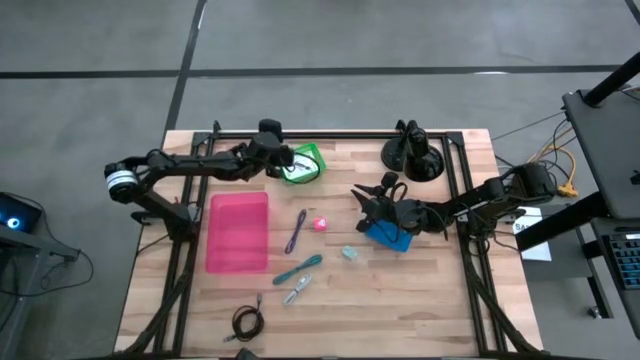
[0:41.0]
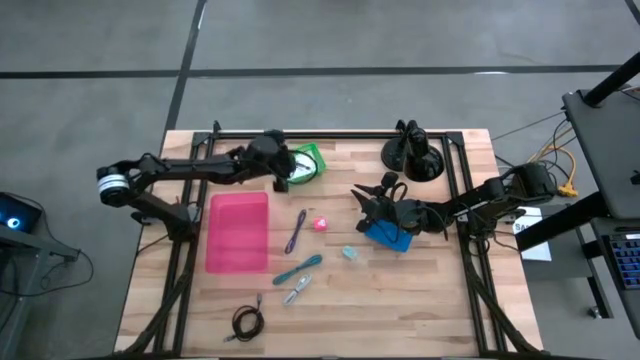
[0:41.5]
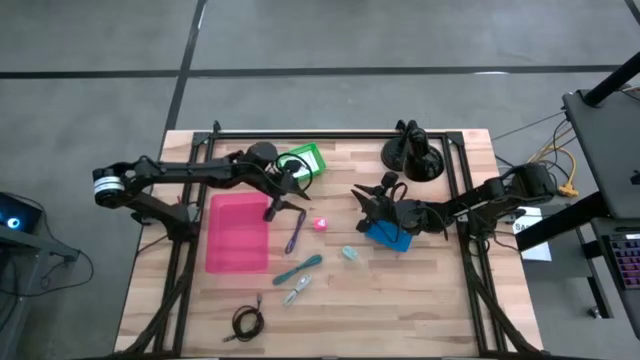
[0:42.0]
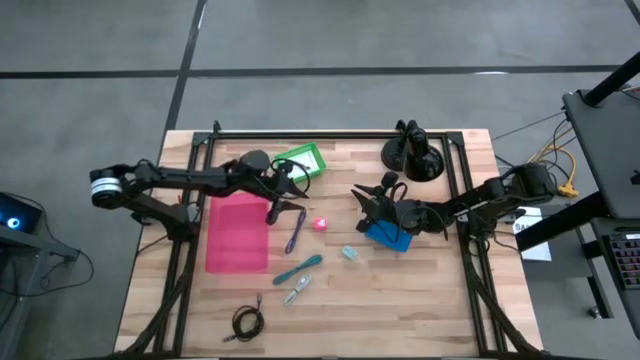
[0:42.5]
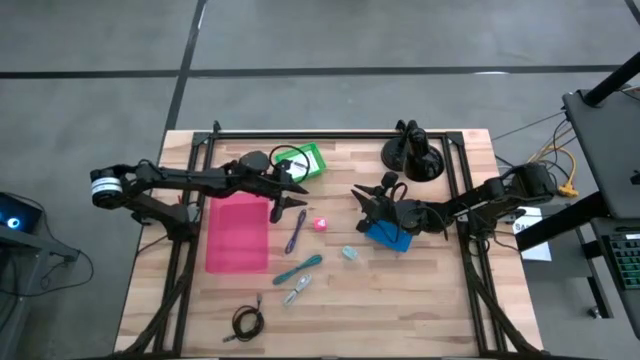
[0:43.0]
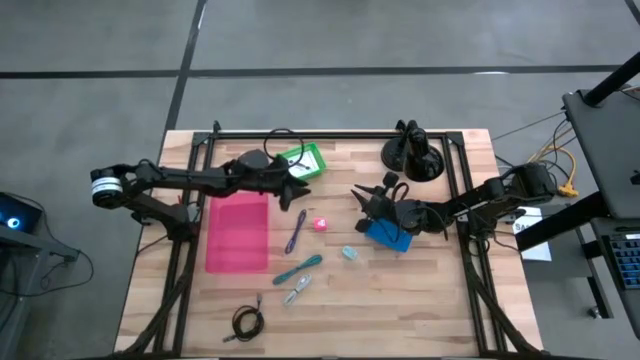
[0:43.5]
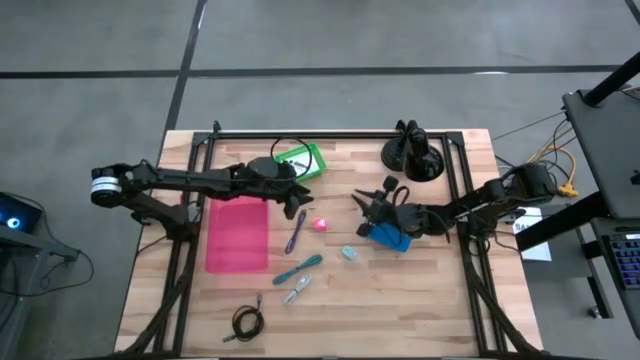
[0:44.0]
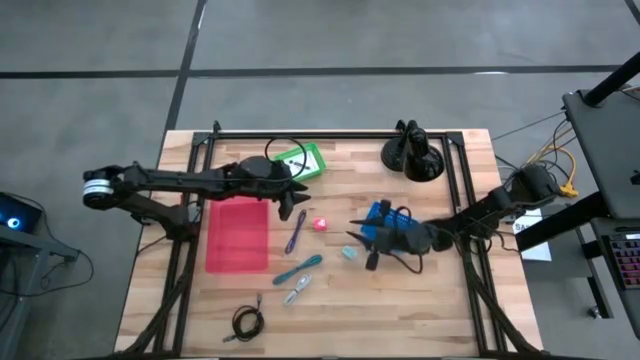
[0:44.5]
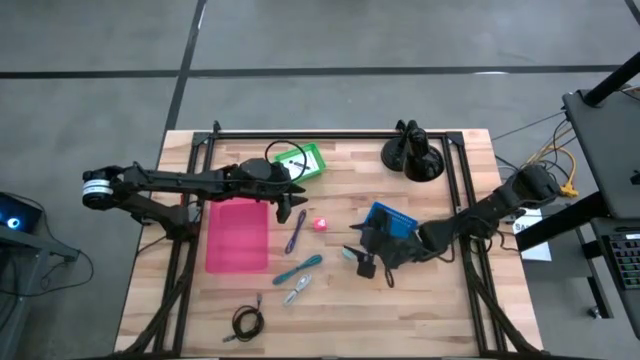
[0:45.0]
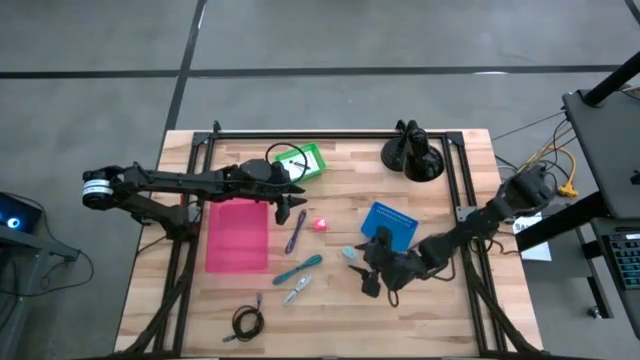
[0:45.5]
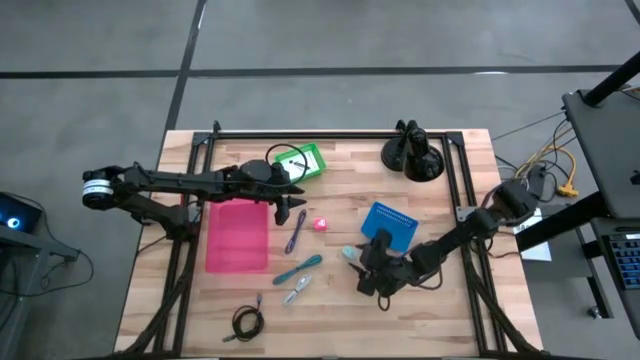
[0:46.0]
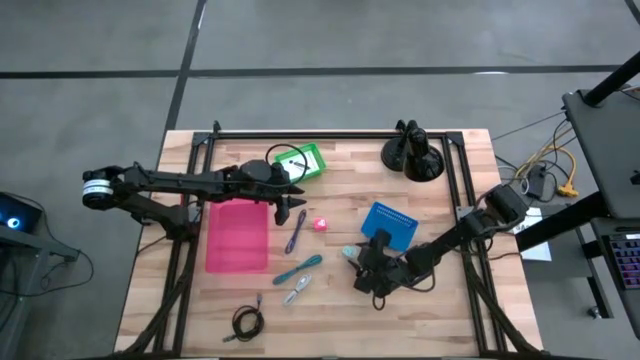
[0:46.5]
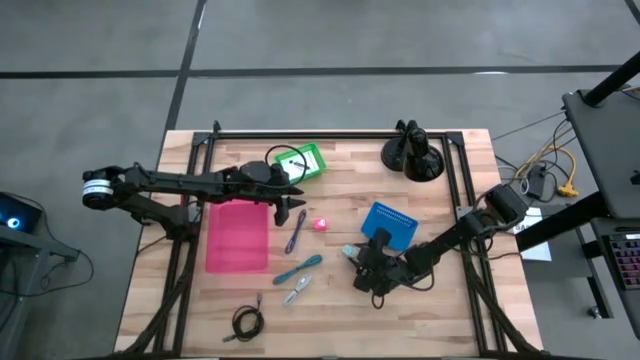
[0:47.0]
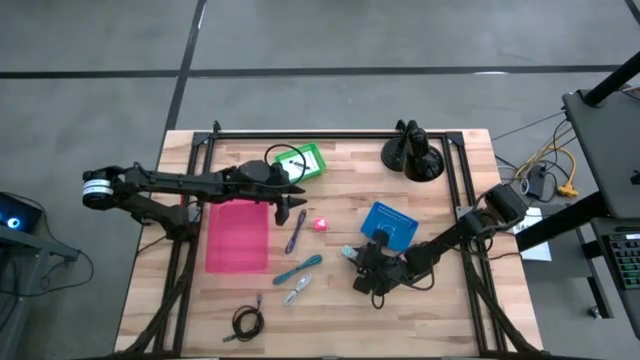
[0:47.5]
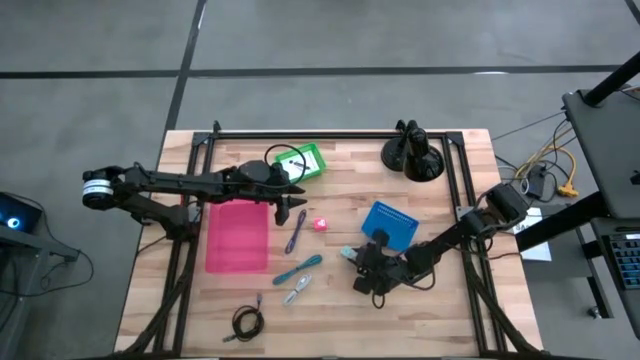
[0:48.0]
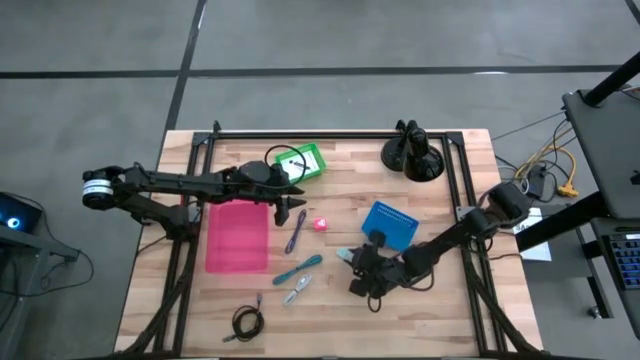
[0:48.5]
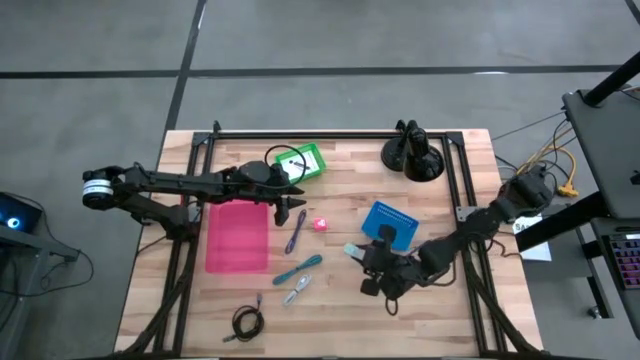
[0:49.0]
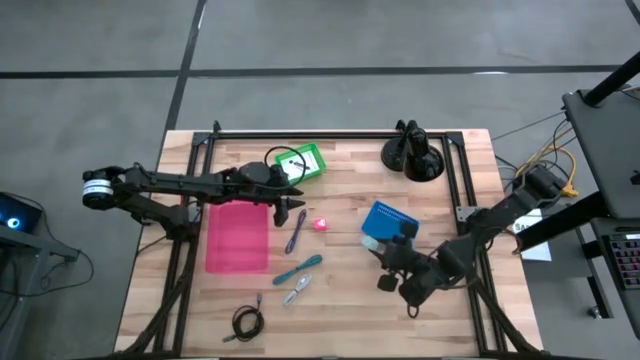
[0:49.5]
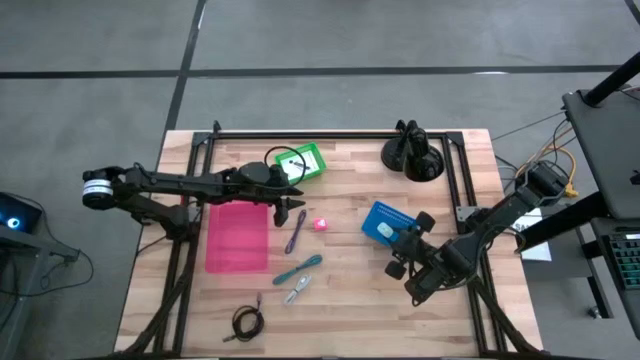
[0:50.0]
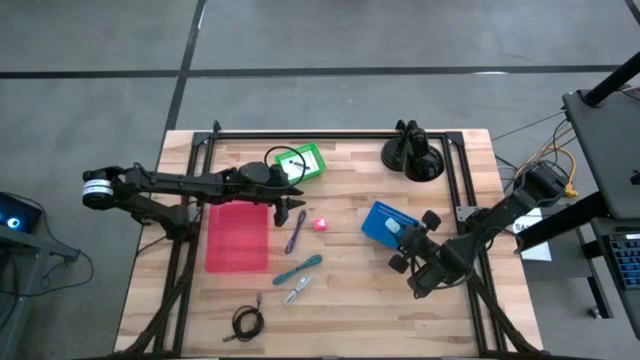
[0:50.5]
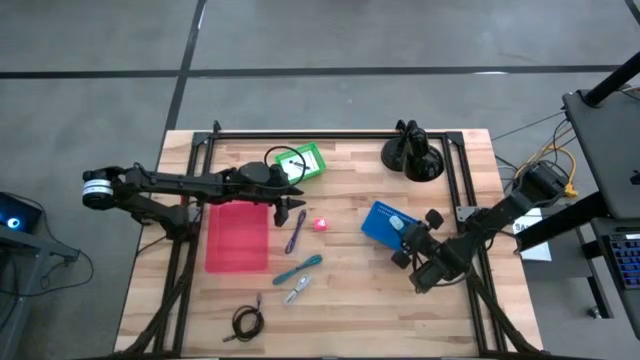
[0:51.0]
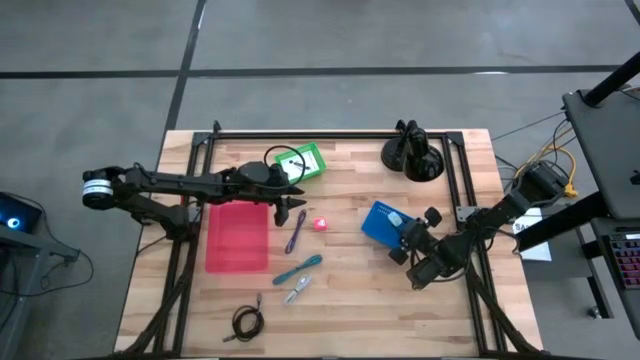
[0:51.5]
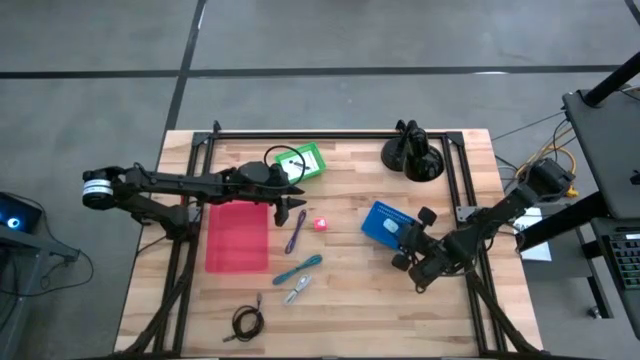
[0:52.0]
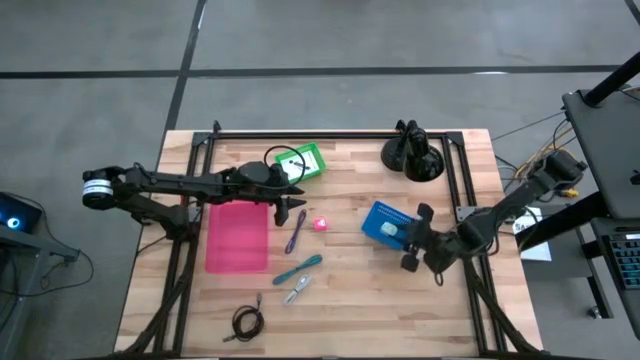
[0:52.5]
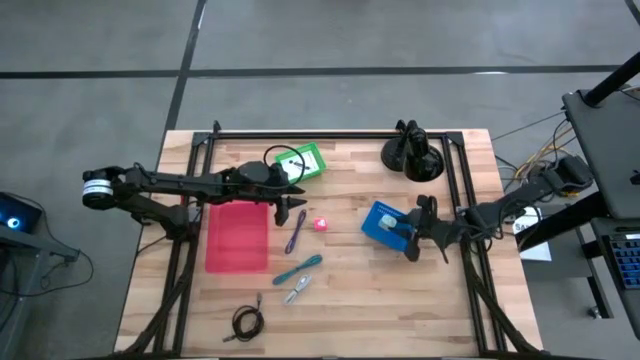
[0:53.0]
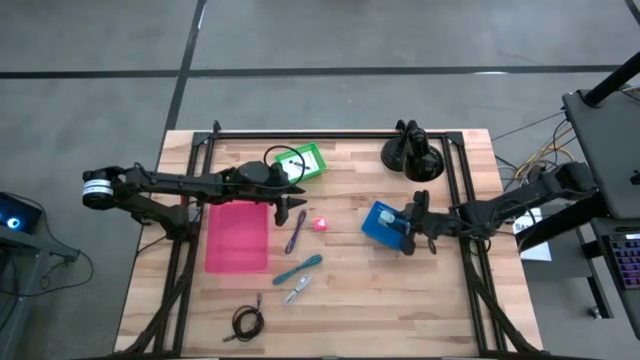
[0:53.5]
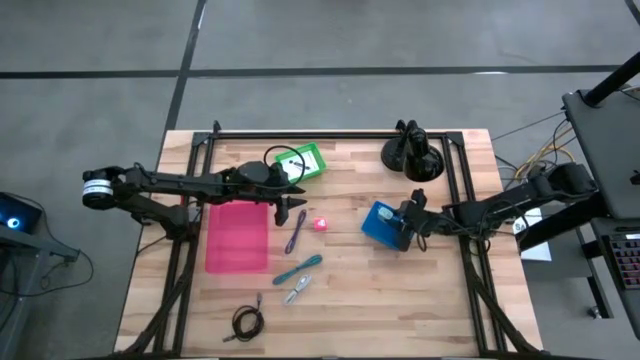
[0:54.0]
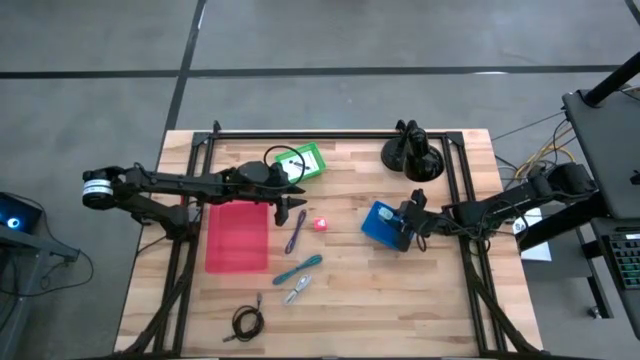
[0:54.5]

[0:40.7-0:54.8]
Task: Pick and place items into bin
Put the blue charger adapter into the blue bin

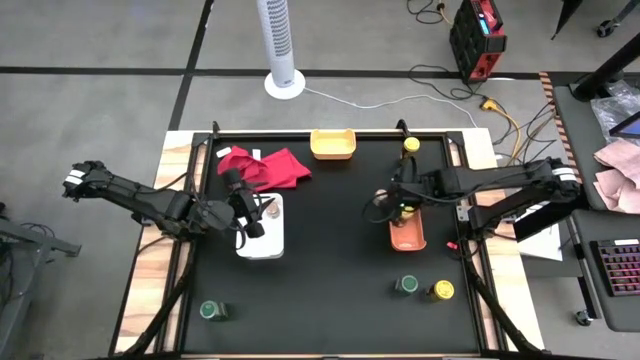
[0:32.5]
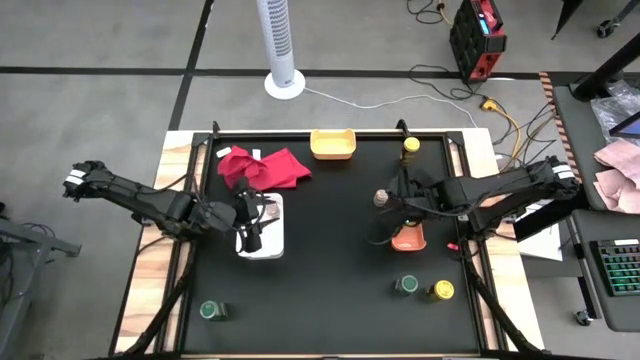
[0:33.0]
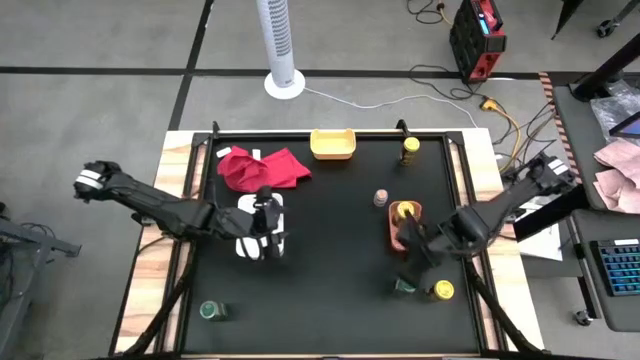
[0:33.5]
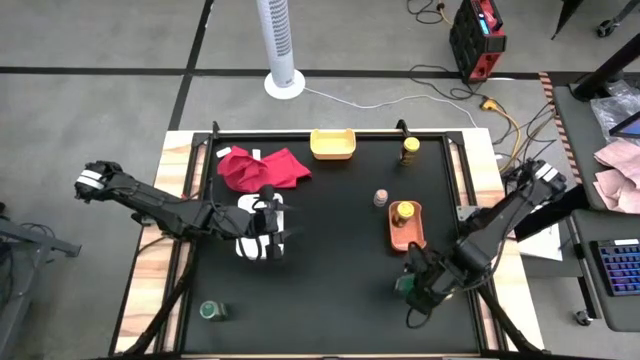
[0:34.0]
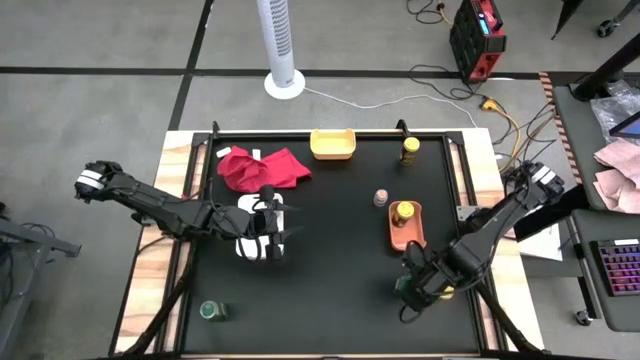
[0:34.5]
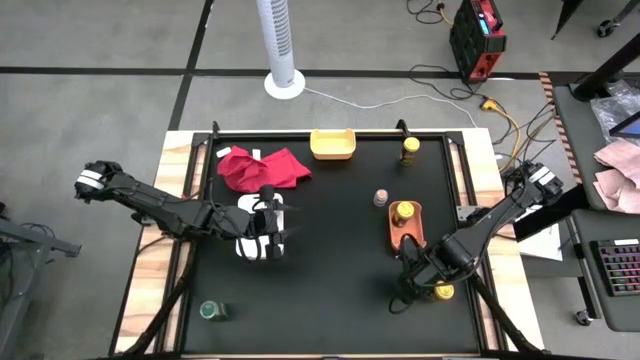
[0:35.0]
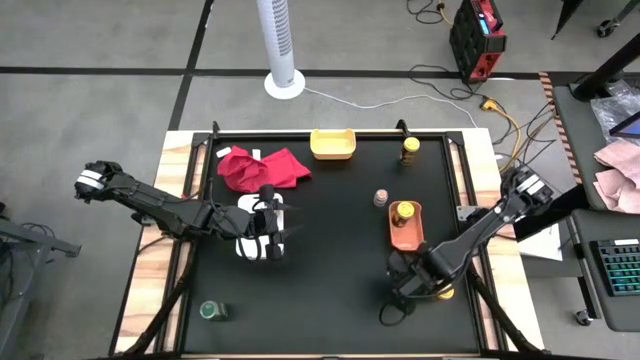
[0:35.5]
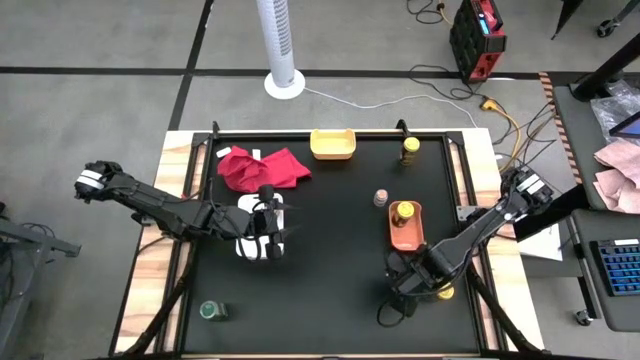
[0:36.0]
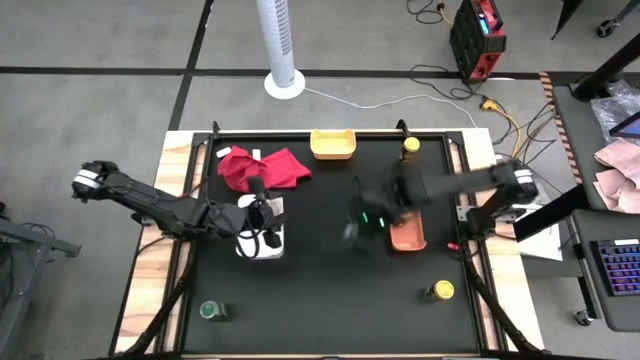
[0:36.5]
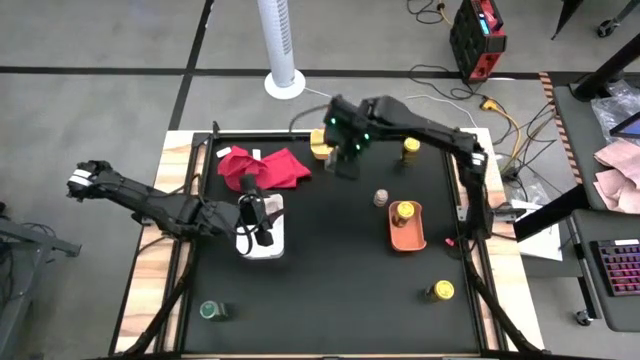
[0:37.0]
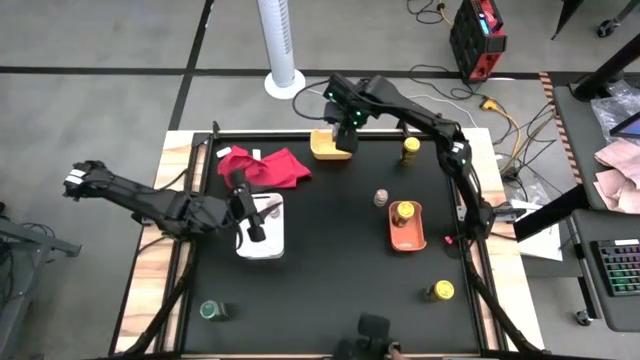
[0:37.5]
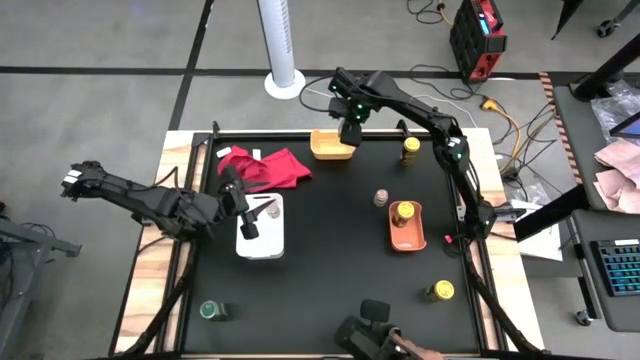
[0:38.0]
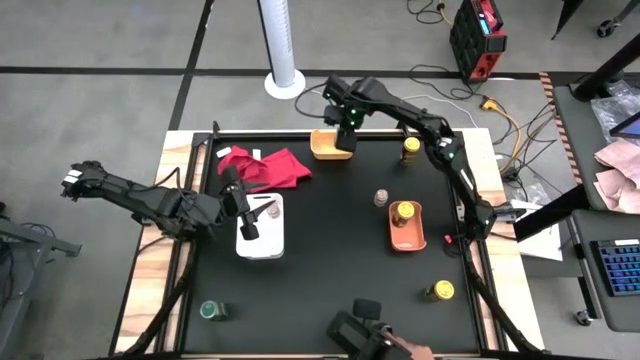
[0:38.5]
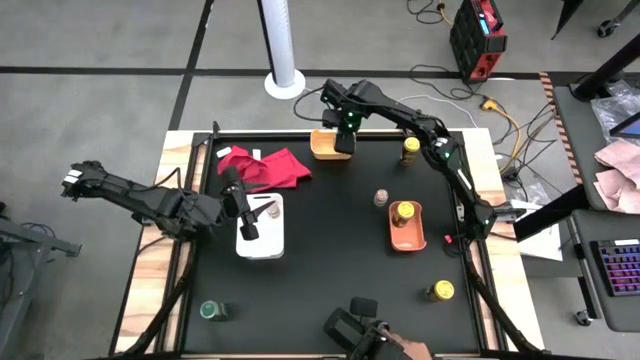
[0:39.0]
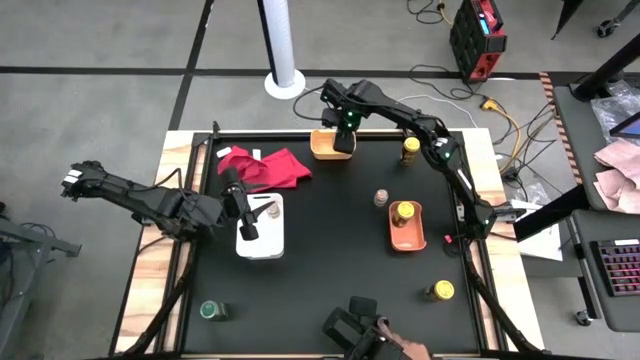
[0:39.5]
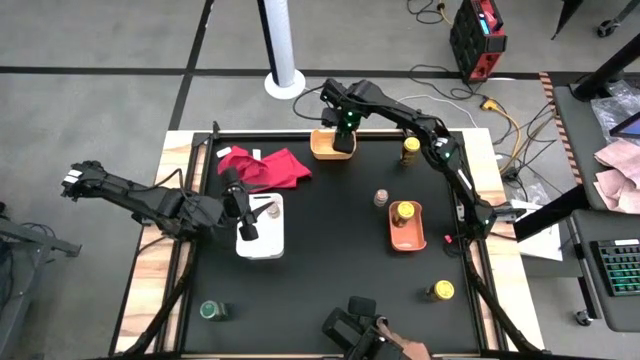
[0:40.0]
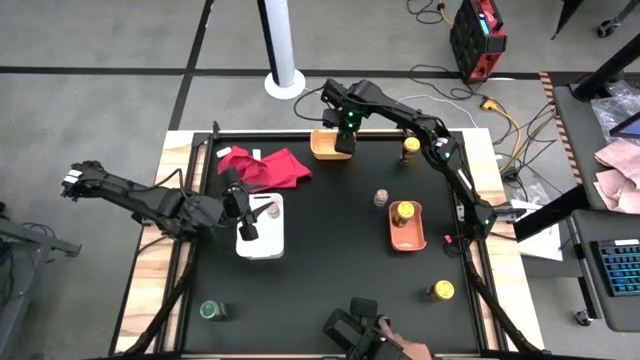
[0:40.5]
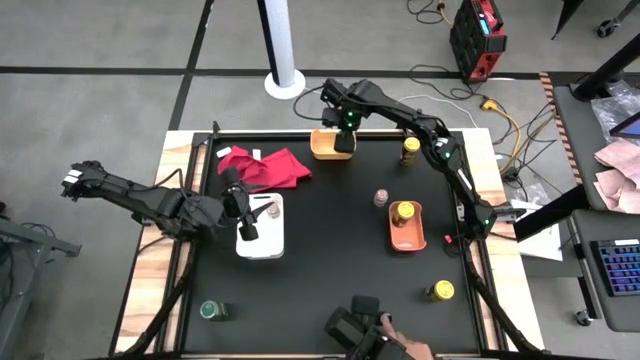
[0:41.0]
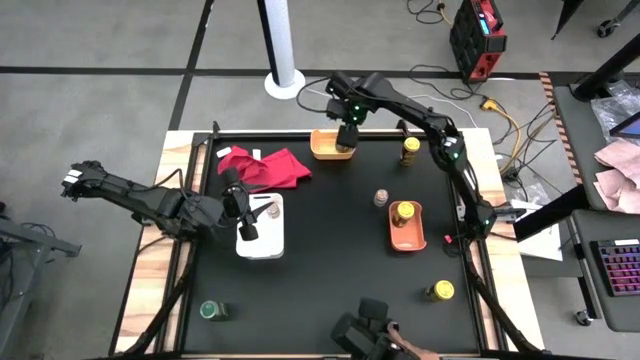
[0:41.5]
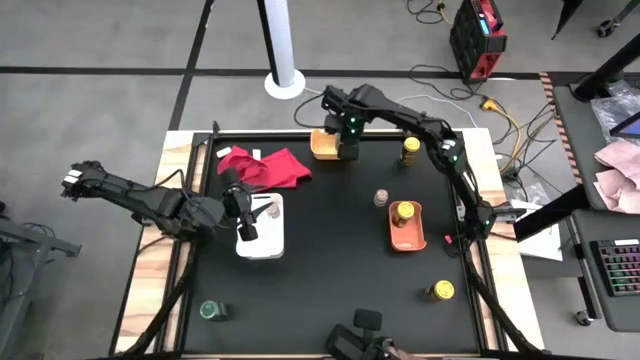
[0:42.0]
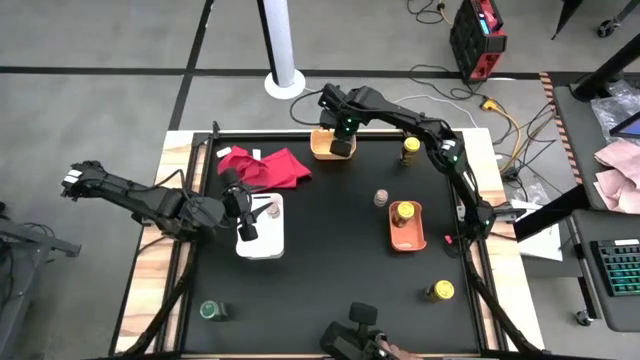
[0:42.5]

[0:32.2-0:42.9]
Task: Sort spices by type
Put the right green seasoning bottle into the yellow bin
